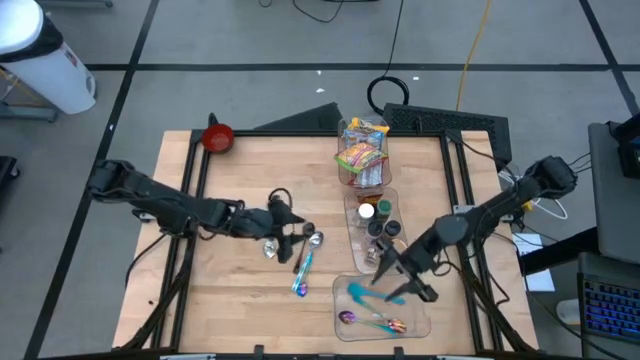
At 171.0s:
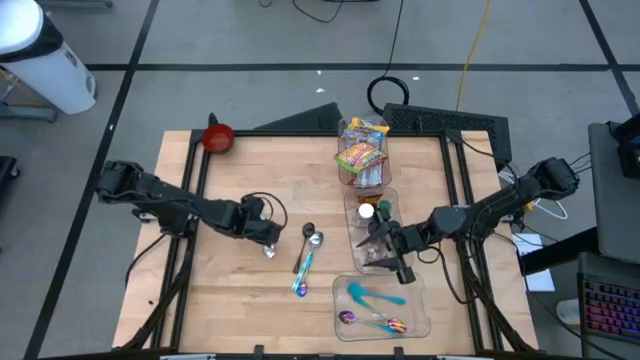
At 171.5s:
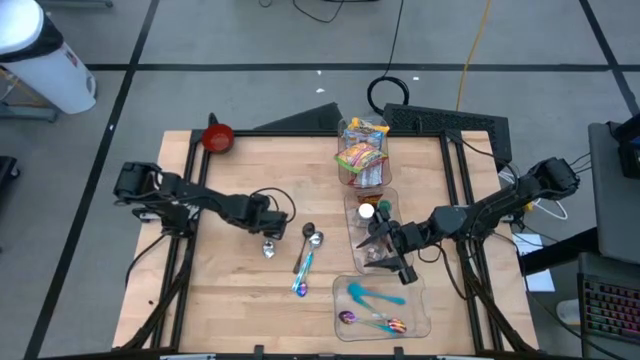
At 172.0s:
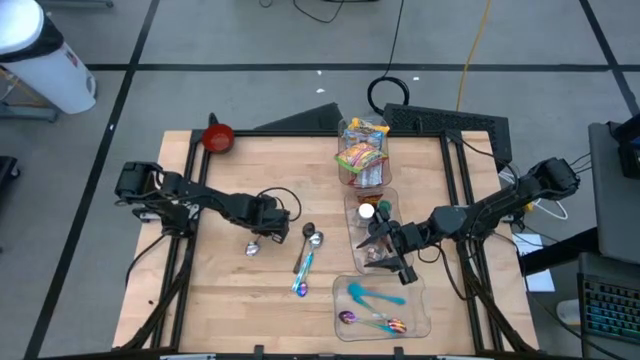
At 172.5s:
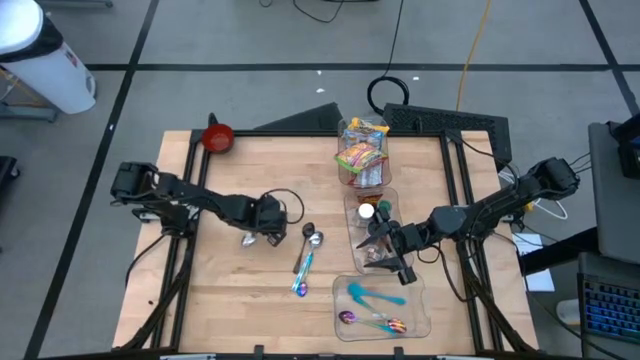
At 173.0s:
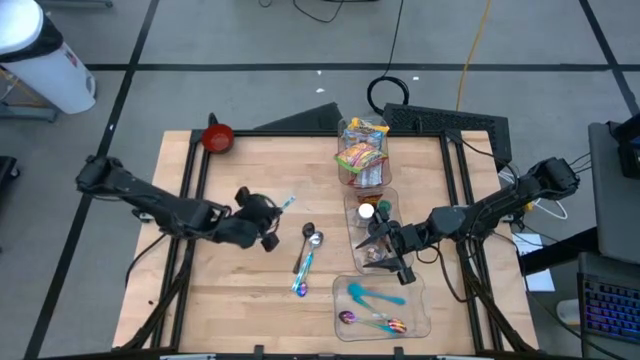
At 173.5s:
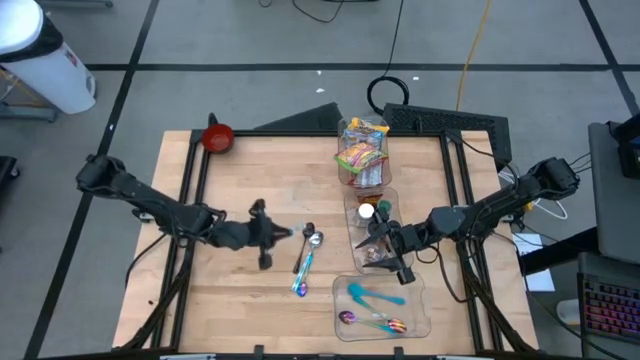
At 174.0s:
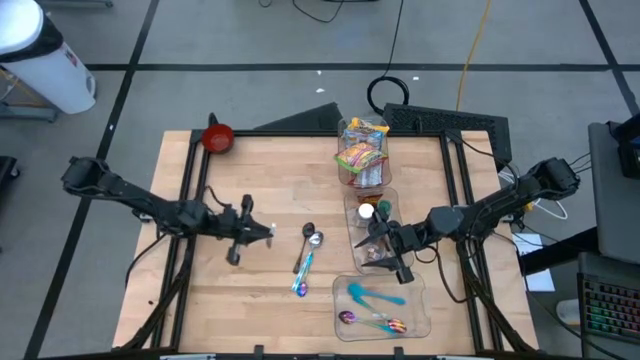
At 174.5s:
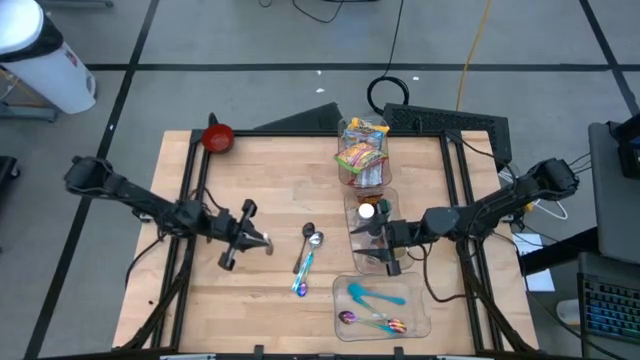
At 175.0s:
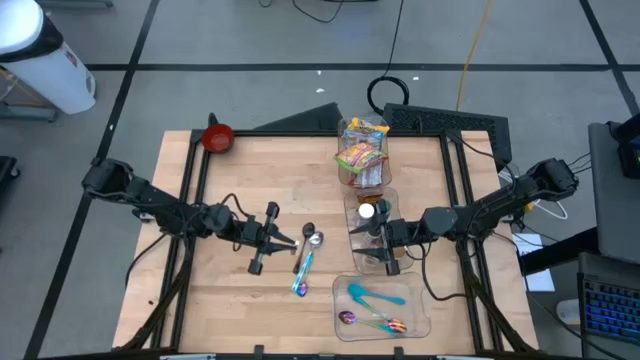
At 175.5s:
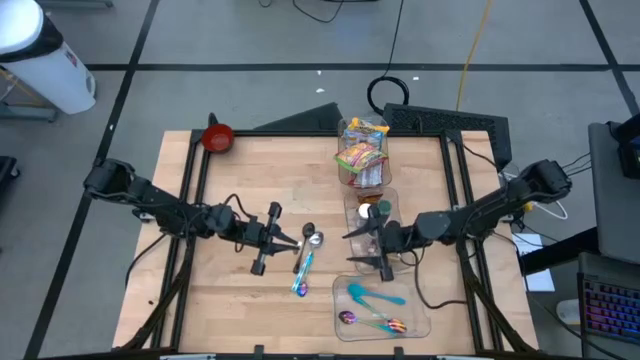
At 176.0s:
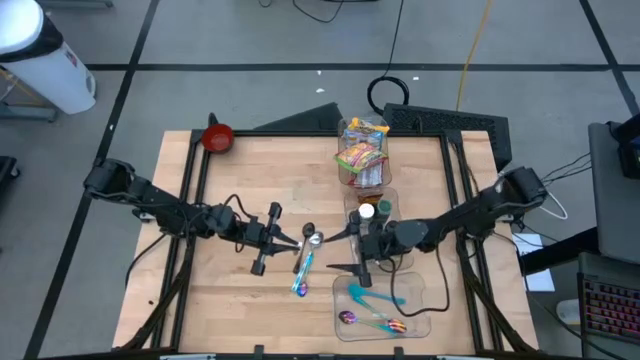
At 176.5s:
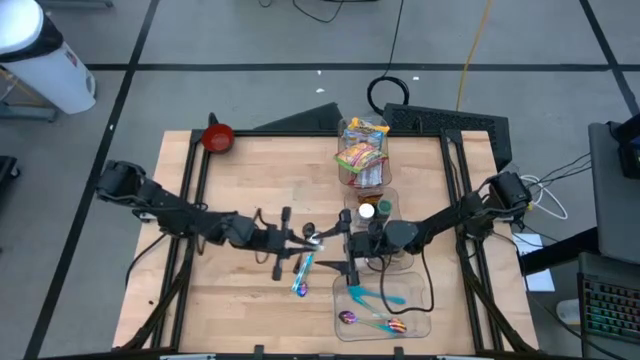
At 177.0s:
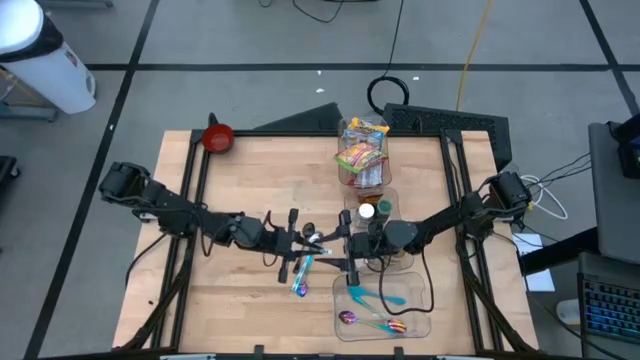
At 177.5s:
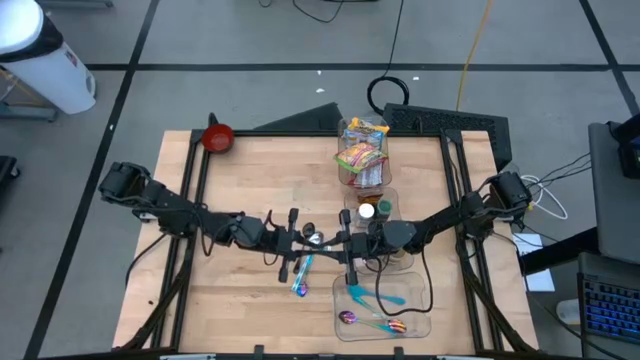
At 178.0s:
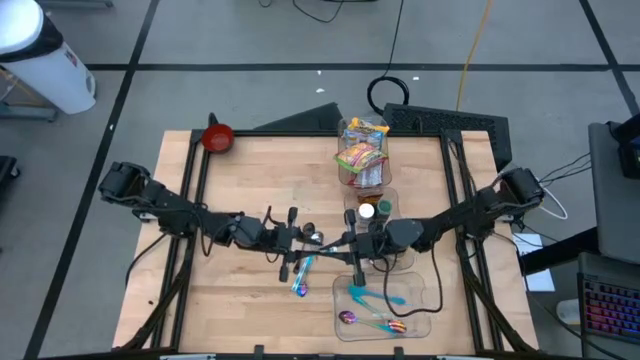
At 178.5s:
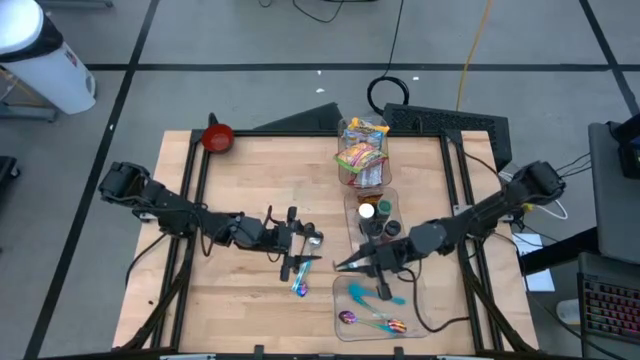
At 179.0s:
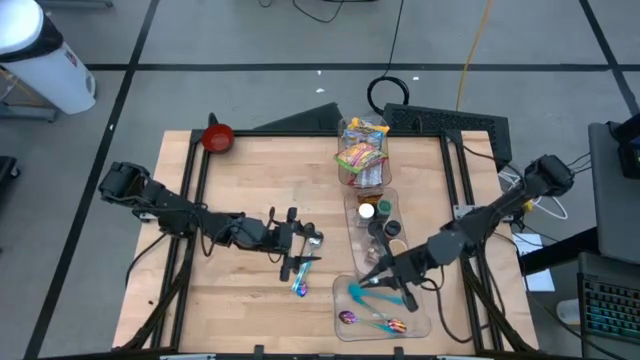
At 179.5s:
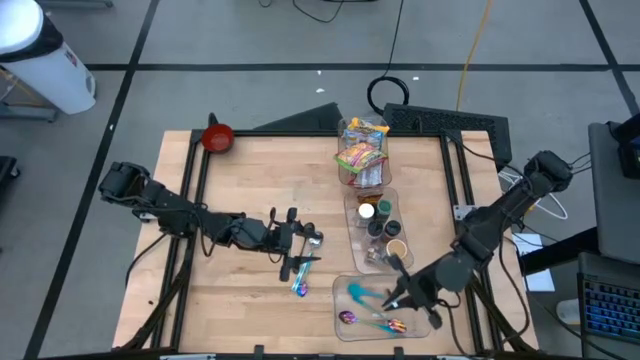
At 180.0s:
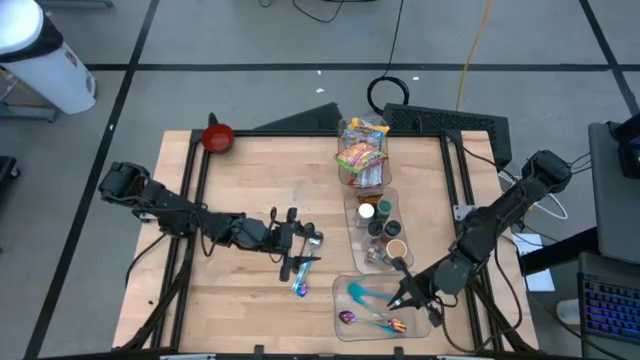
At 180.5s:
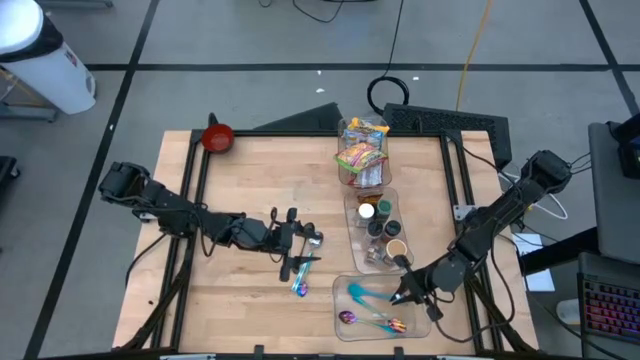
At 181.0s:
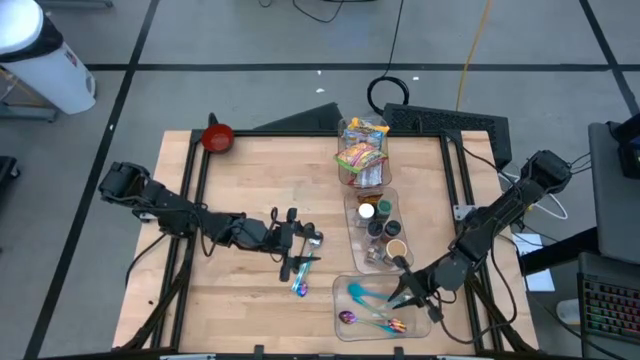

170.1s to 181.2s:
Task: Pick & Place Food Item
Put the top light blue spoon into the bottom transparent bin

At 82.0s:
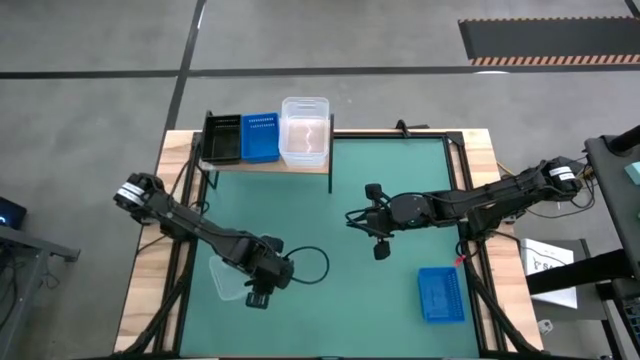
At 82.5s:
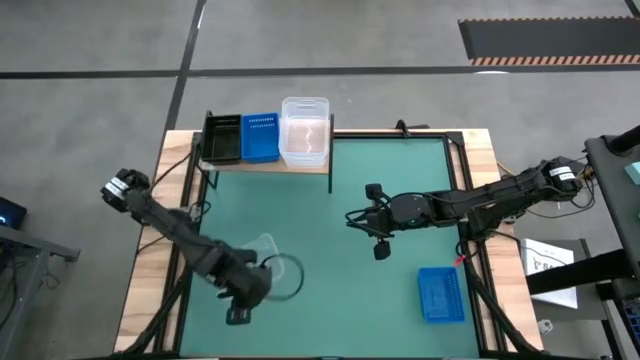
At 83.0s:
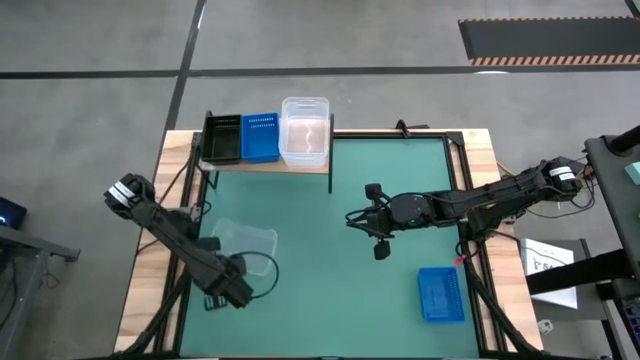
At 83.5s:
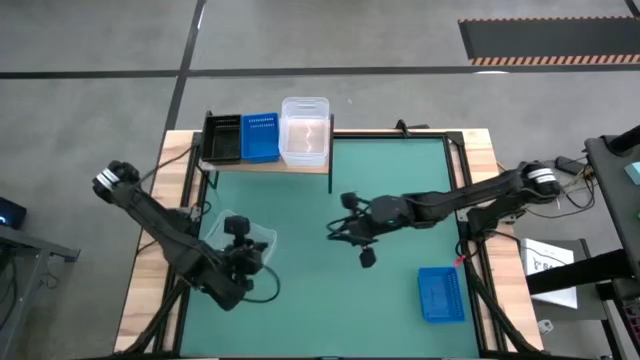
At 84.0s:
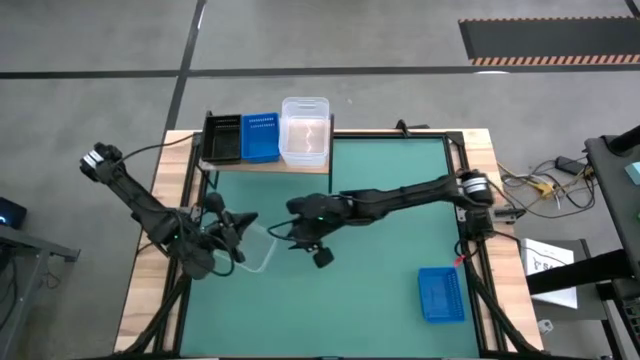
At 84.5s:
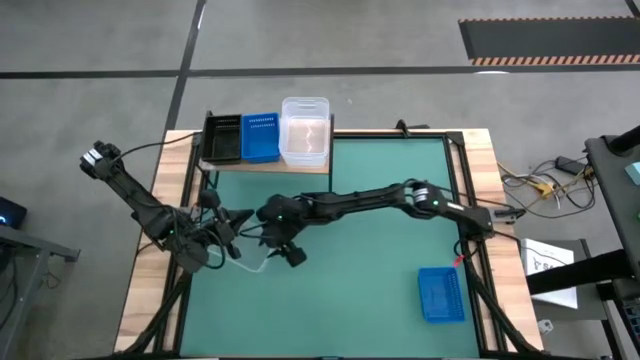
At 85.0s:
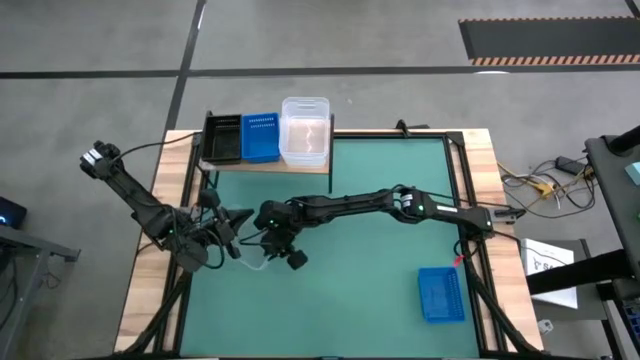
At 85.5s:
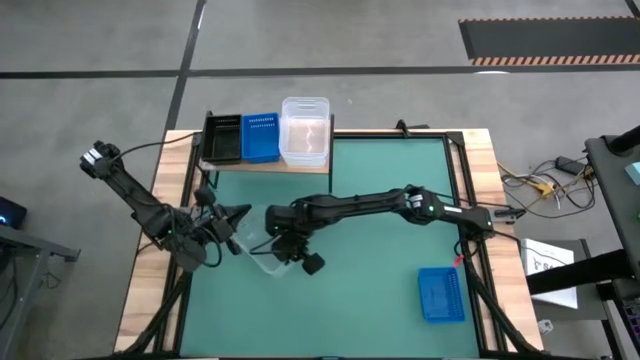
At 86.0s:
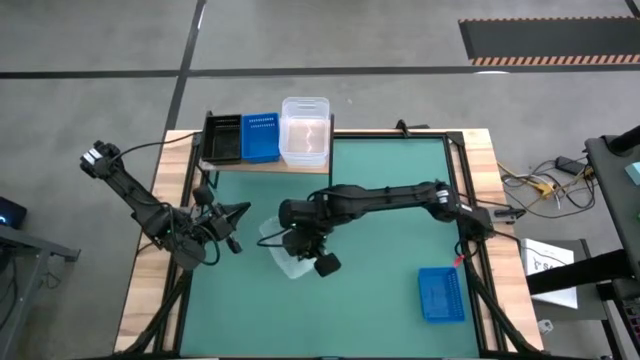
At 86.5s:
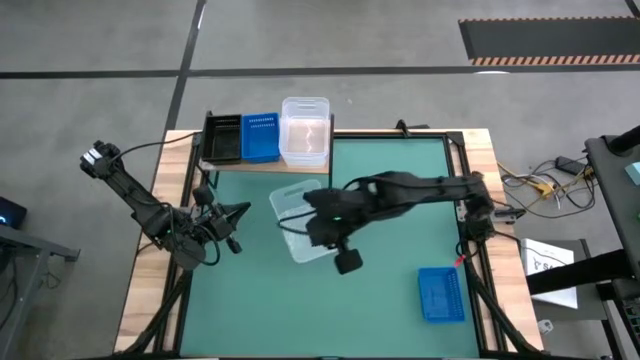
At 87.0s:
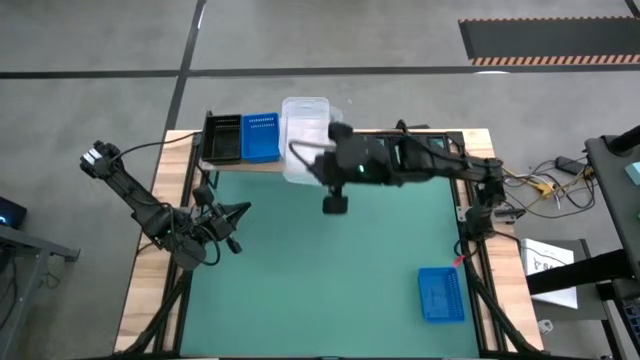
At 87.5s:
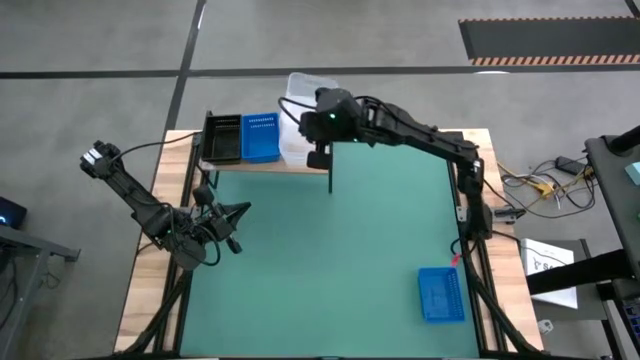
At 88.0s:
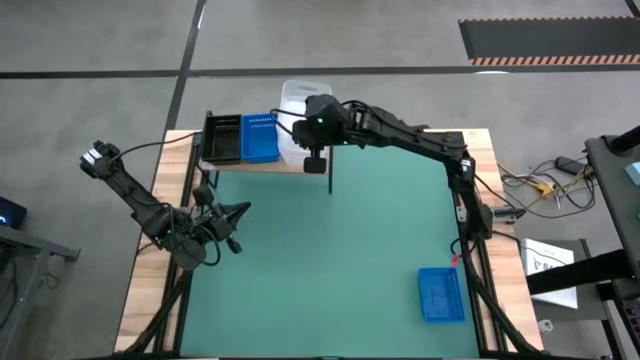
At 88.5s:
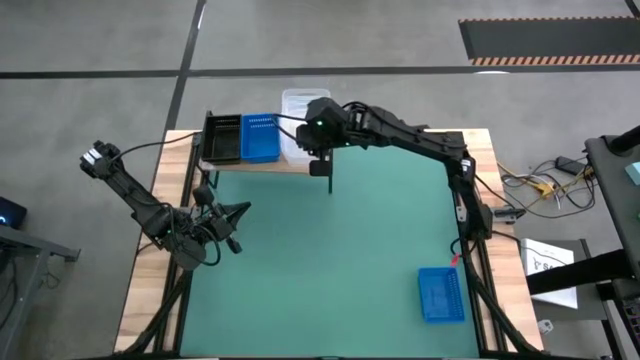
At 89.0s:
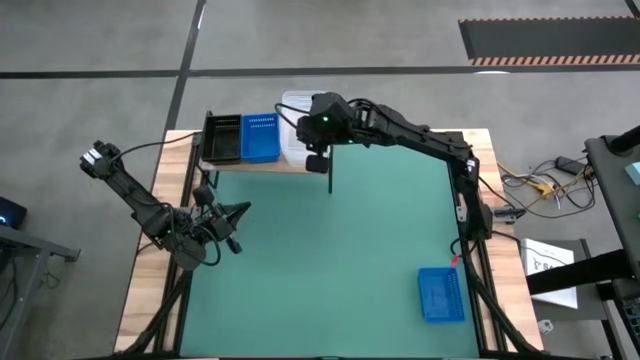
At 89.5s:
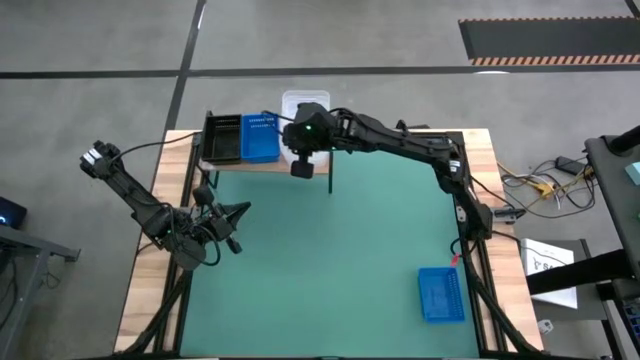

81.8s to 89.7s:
Task: Stack baskets on shelf by color
Stack the transparent bin on top of the transparent bins on the shelf

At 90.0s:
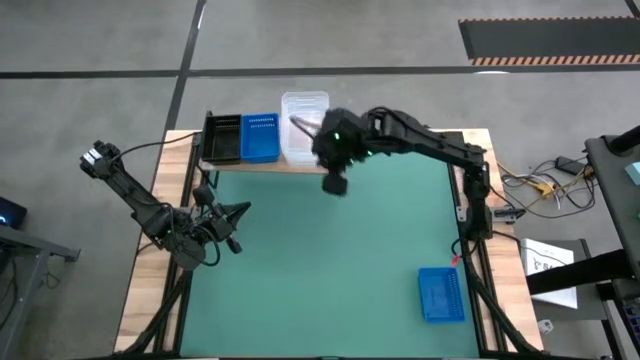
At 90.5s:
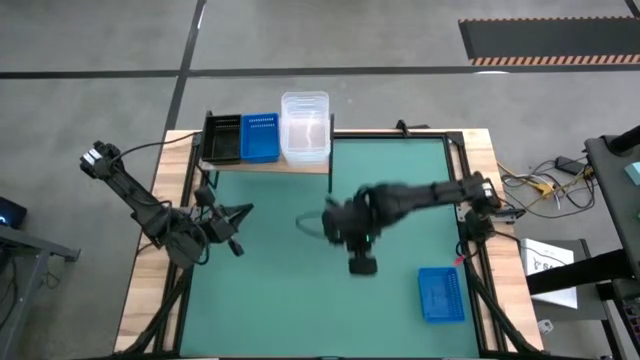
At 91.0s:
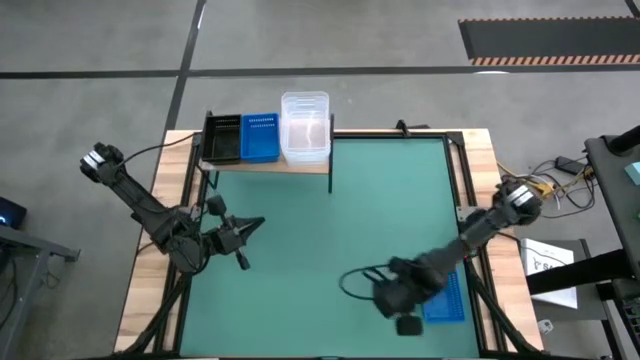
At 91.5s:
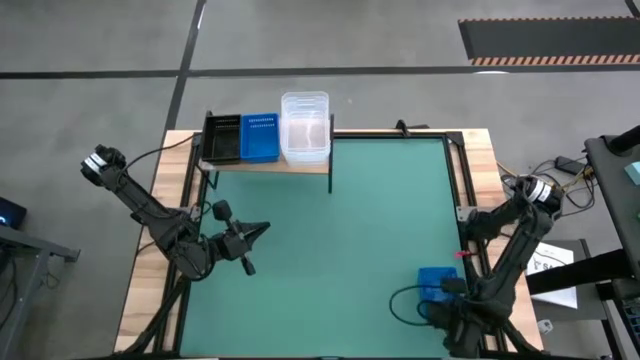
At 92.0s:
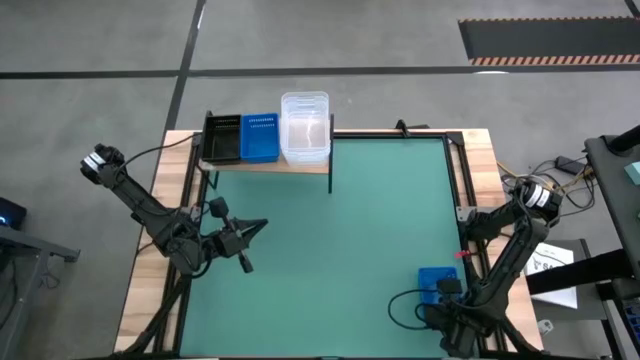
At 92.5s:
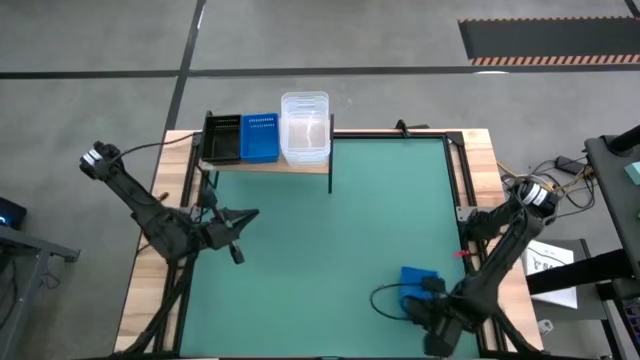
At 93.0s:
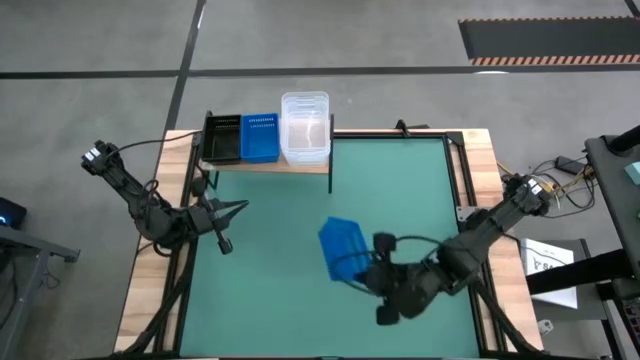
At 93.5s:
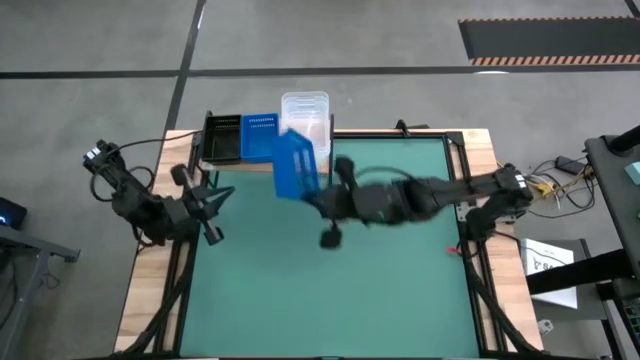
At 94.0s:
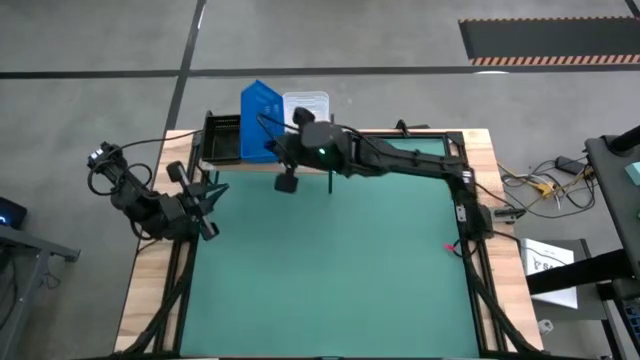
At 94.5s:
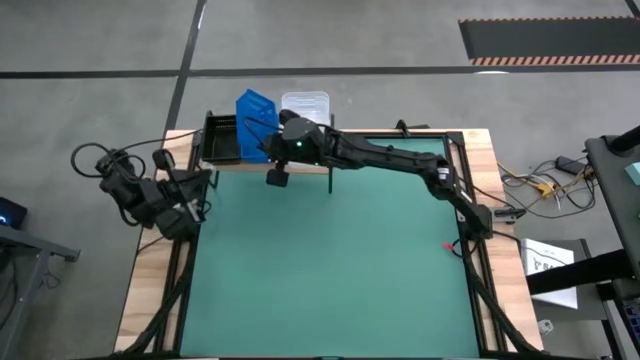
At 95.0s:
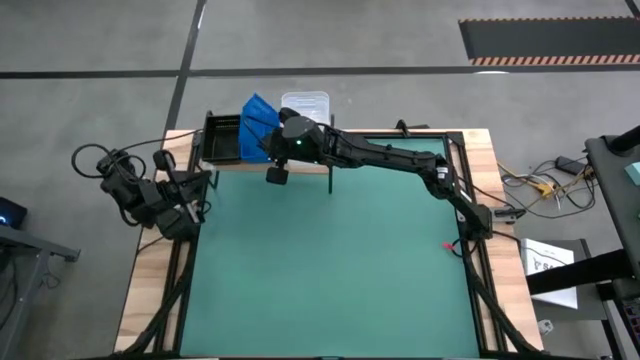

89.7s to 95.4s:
Stack the blue bin on top of the blue bins on the shelf
